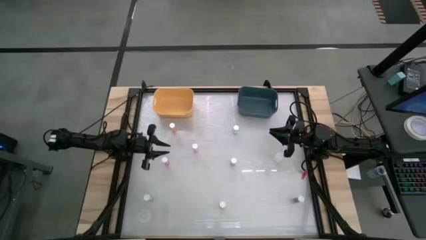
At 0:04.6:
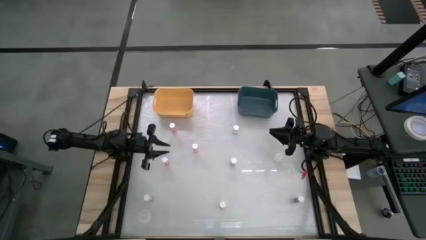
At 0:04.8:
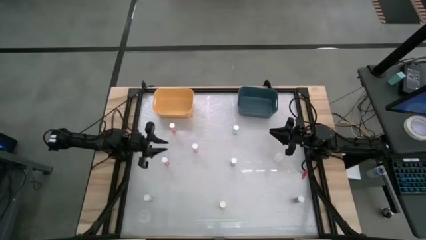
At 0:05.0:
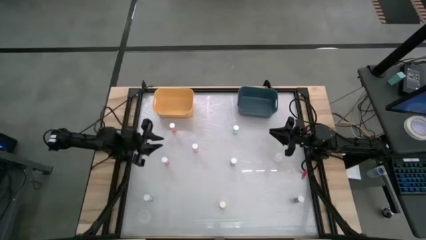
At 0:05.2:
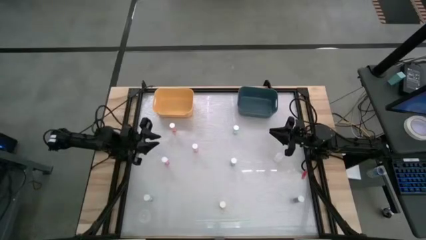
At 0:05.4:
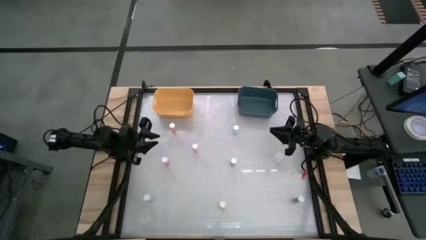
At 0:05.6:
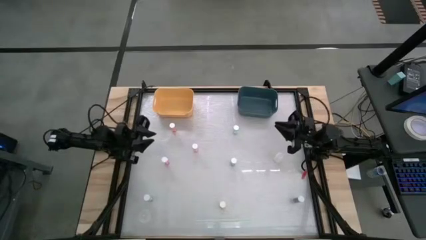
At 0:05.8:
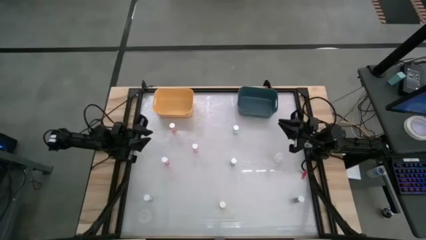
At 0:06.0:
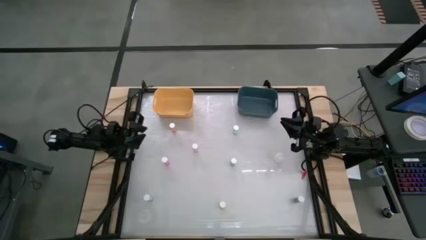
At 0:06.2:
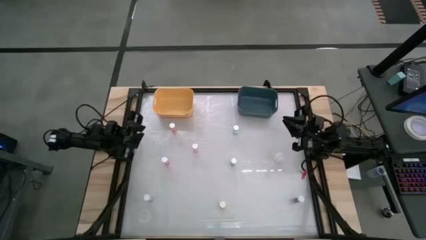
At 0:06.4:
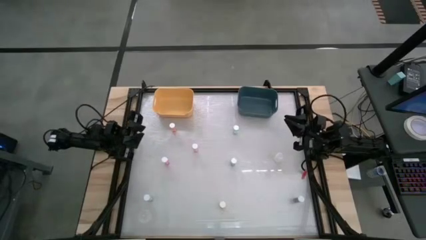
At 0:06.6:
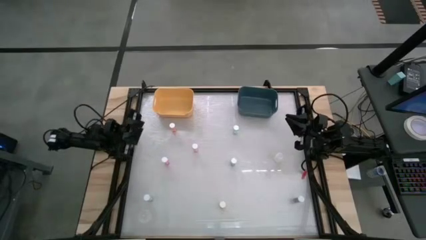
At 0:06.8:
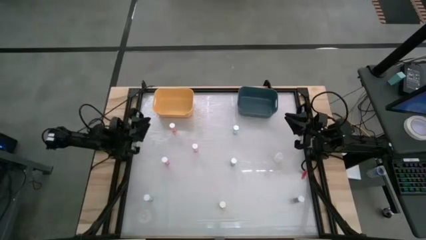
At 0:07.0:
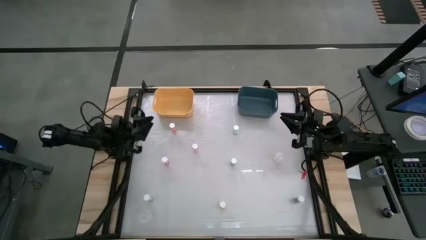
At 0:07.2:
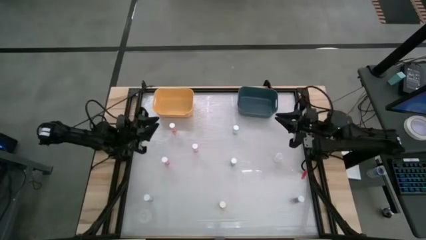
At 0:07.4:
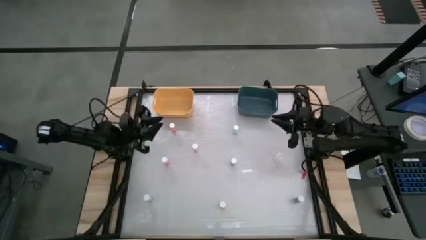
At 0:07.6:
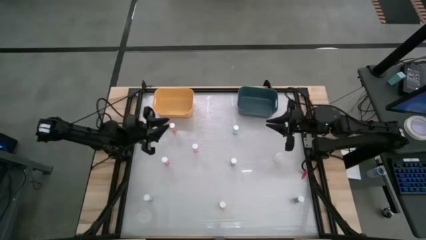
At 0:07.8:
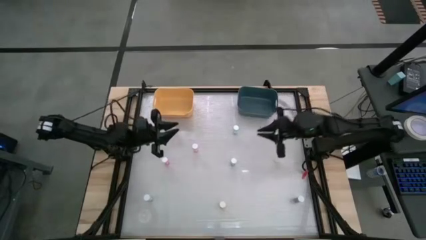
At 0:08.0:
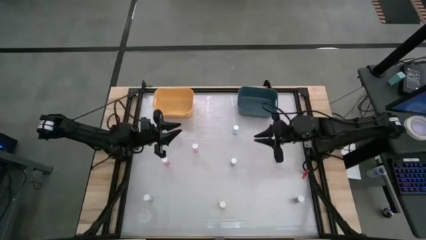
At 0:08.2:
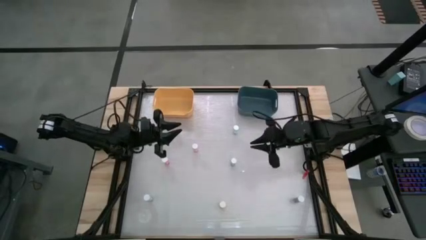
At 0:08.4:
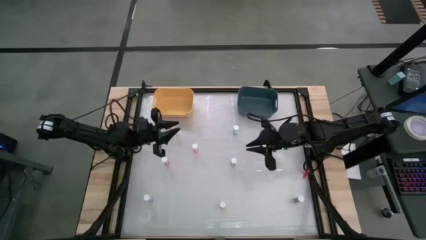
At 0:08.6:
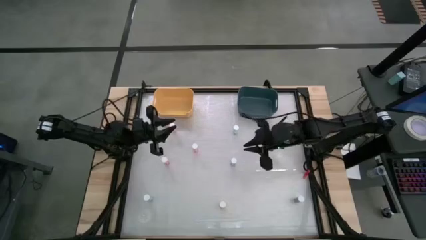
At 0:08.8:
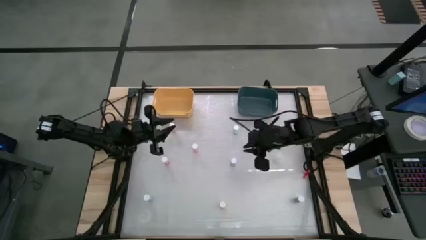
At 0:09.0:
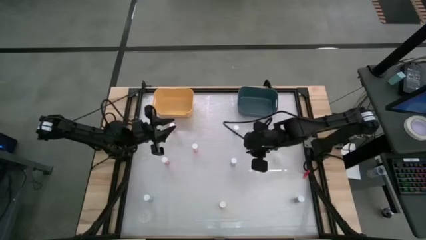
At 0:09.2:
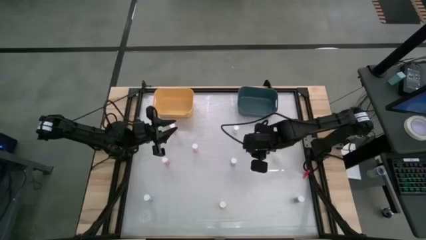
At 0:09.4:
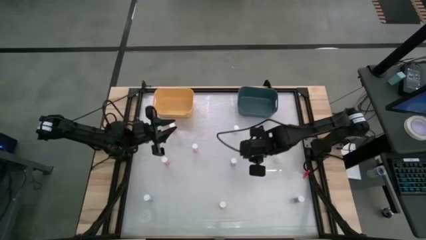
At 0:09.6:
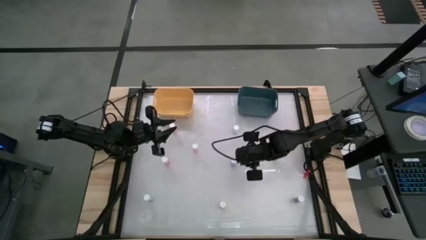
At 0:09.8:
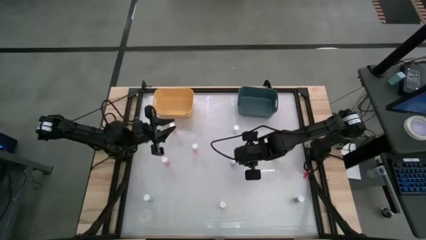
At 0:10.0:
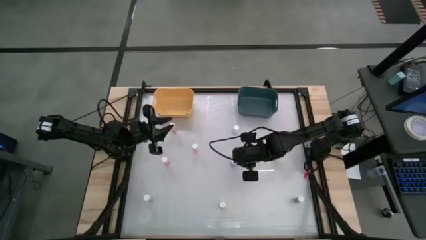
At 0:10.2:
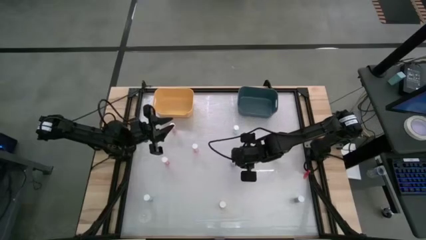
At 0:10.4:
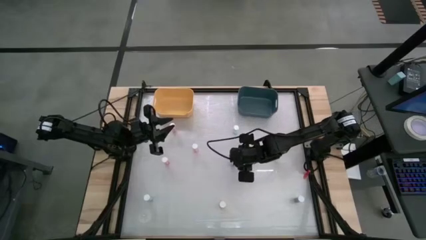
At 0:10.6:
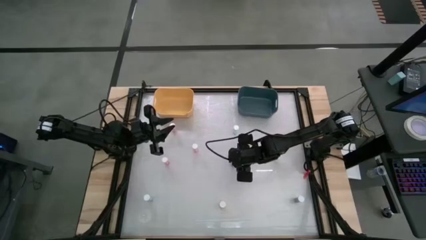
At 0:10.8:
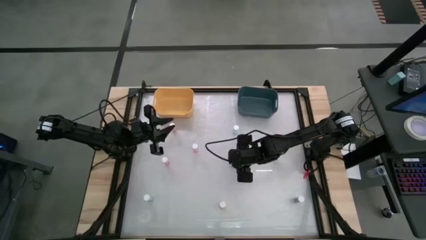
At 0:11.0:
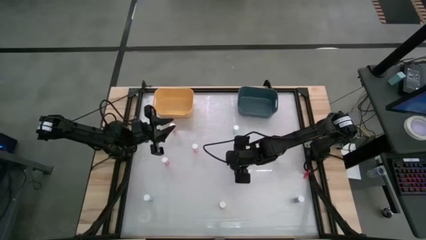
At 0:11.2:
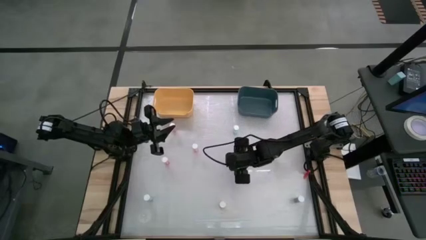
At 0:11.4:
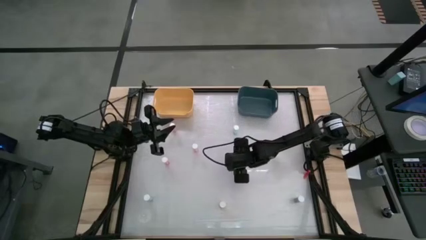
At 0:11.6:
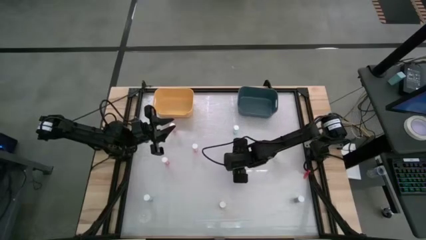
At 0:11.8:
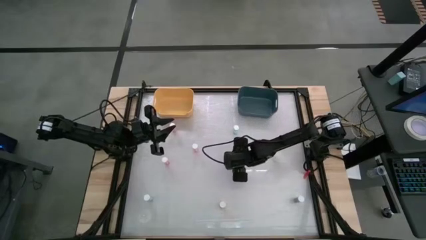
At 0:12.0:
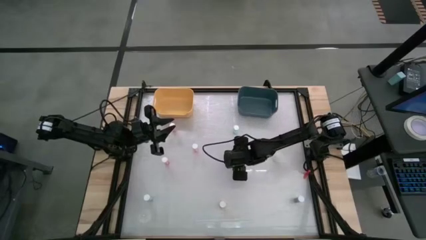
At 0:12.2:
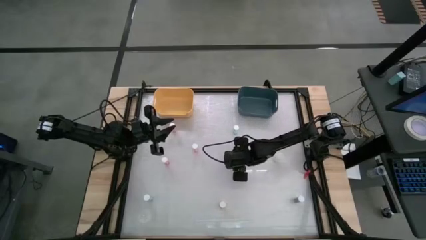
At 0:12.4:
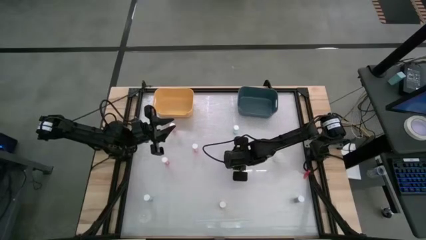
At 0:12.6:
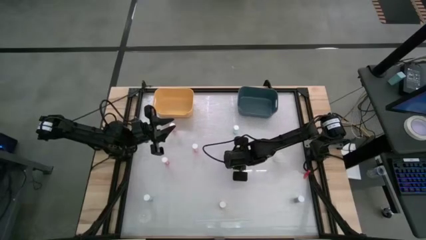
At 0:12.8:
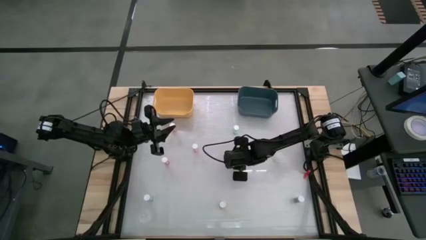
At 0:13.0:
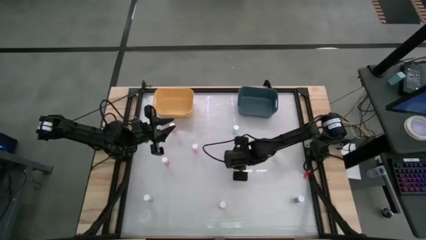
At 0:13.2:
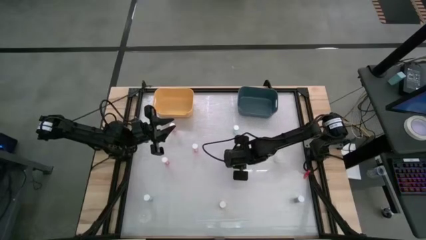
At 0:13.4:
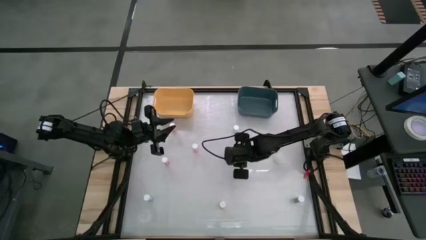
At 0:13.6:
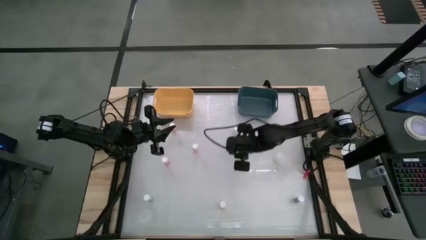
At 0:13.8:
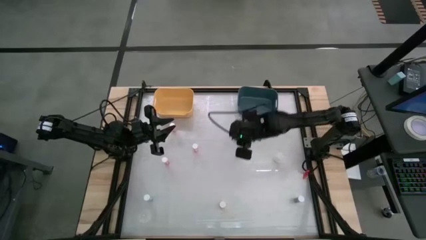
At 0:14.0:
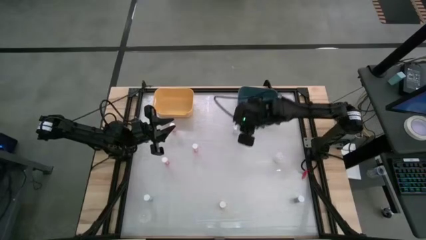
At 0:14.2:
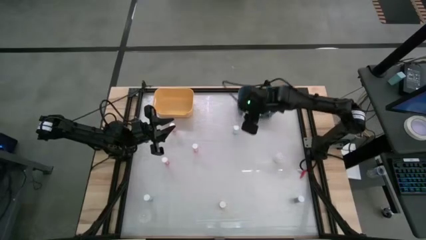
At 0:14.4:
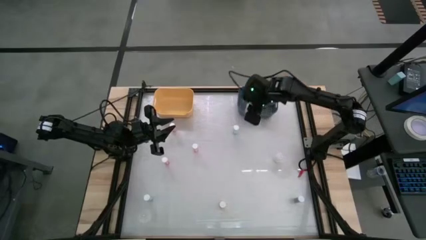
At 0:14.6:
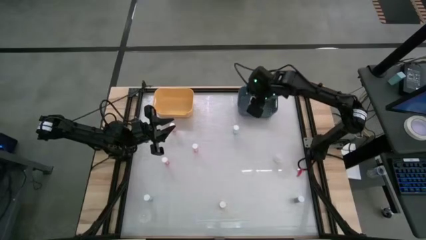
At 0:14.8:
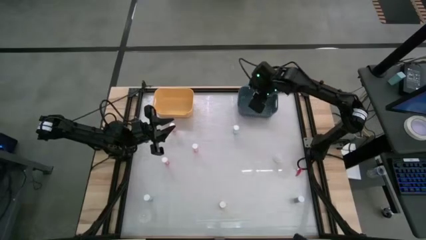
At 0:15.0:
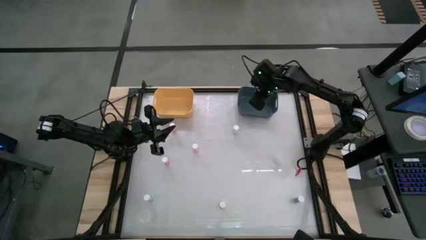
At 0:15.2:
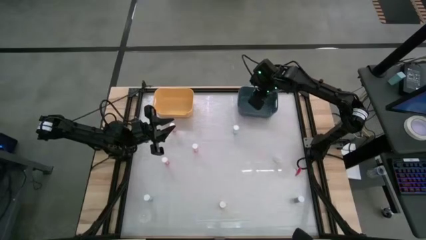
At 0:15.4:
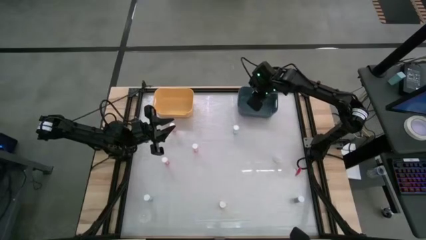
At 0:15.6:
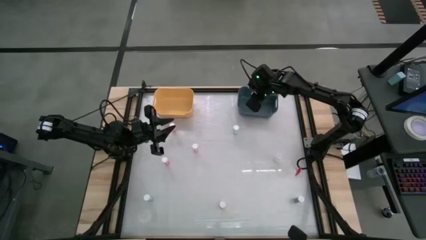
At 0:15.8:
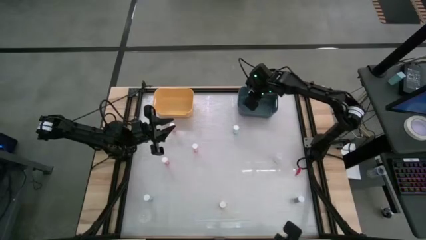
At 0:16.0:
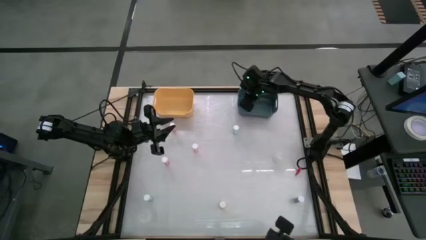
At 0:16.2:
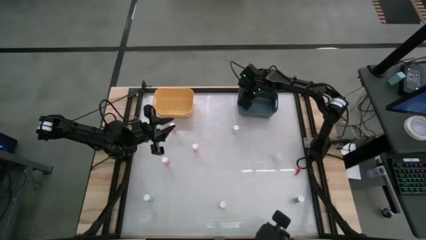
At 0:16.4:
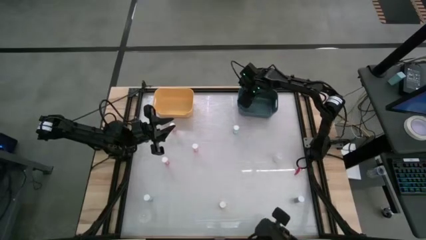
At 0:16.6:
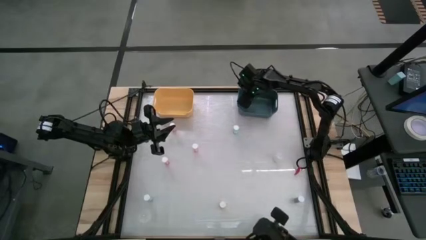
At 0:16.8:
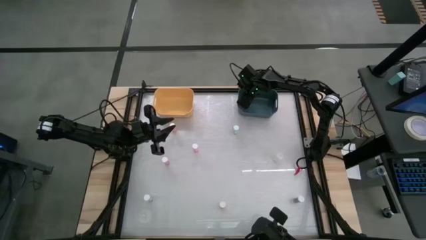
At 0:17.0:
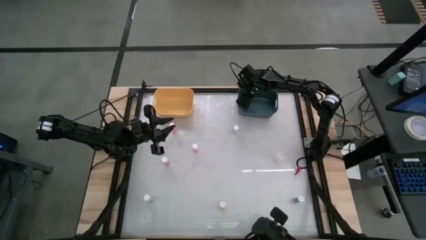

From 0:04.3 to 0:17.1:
Task: Pick and place medicine bottles into bin by pill shape (circle, oval)
Put the top blue capsule bottle into the blue bin
